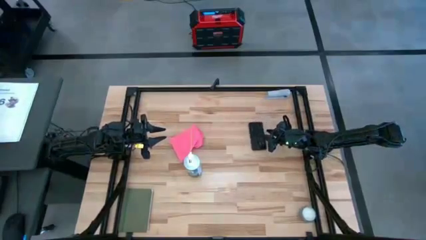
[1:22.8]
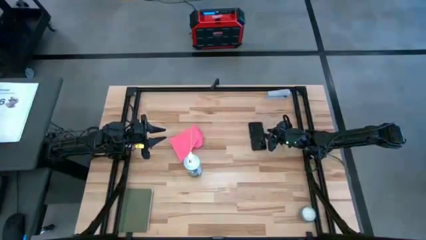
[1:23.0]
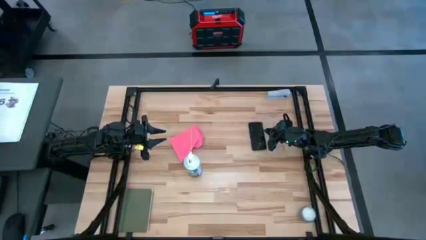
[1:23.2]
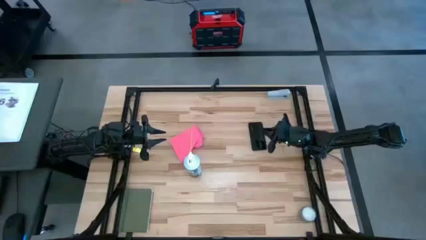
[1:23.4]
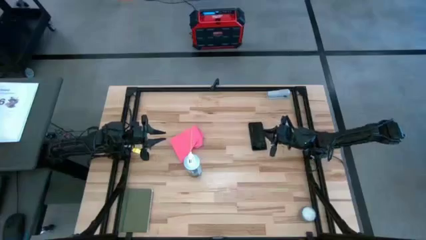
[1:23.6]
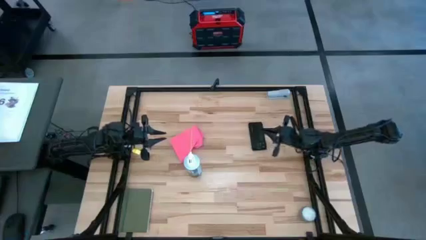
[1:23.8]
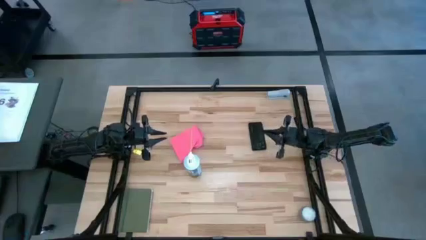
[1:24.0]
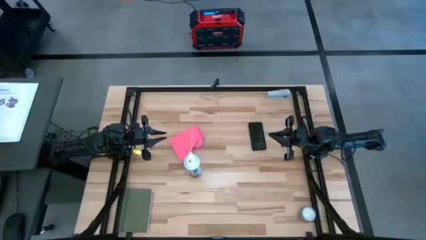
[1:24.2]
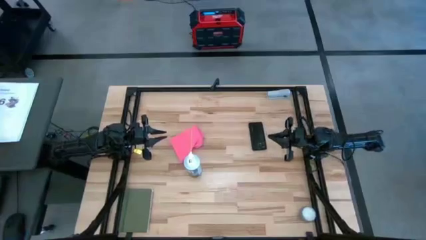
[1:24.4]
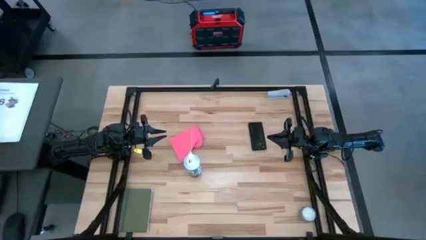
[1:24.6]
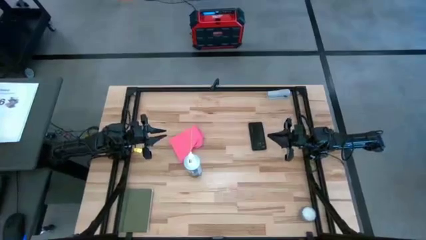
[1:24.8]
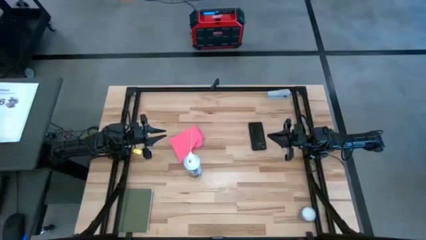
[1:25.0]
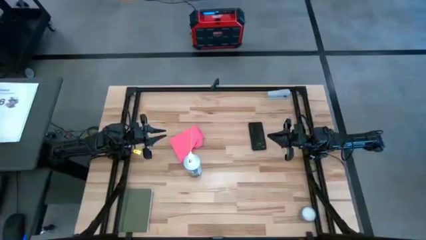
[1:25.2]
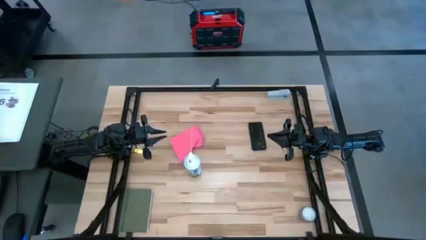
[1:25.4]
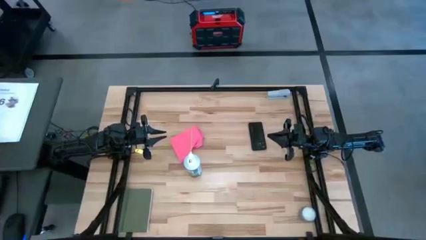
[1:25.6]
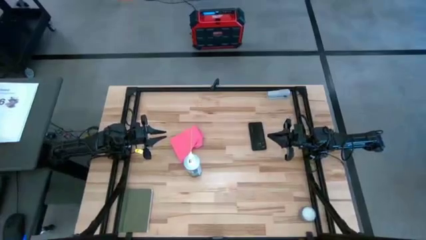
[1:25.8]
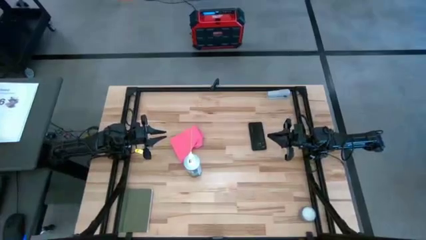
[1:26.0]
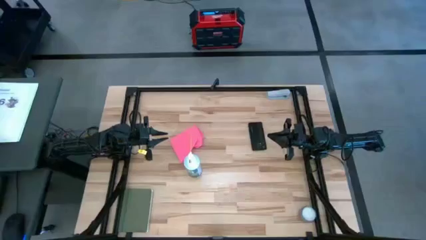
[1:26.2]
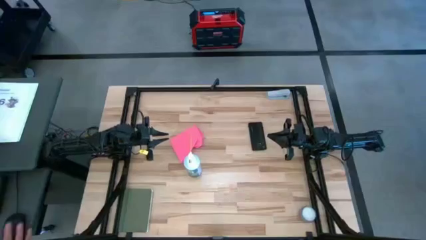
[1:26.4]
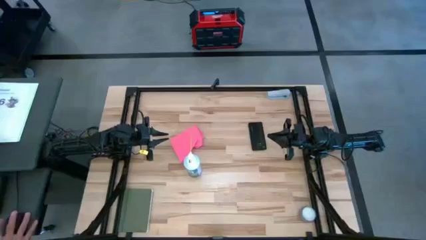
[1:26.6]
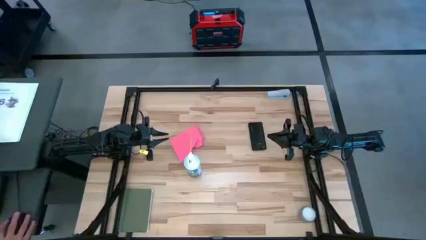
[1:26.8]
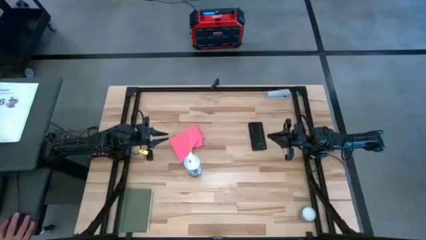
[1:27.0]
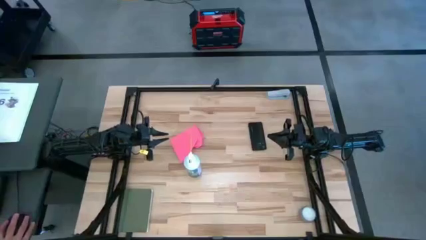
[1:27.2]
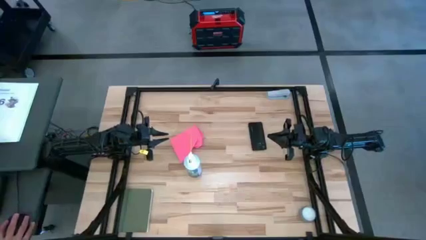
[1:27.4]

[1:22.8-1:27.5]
Task: Apply microfiber cloth
Return to Home Position

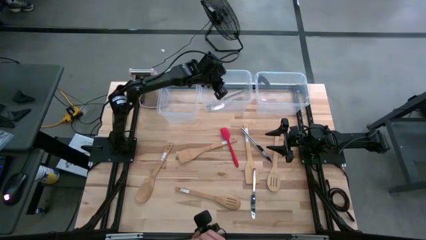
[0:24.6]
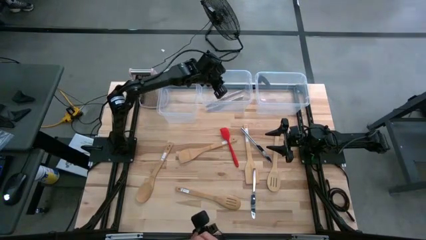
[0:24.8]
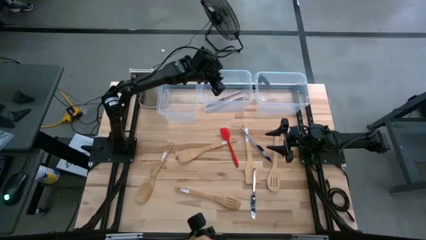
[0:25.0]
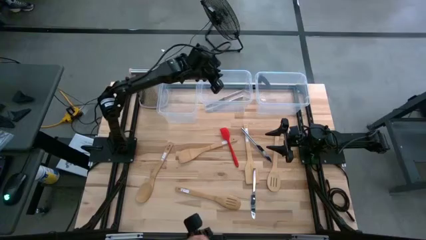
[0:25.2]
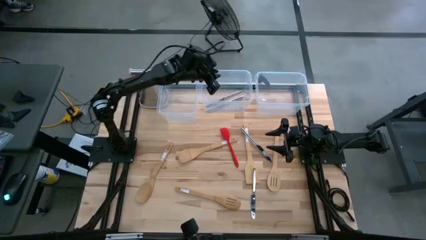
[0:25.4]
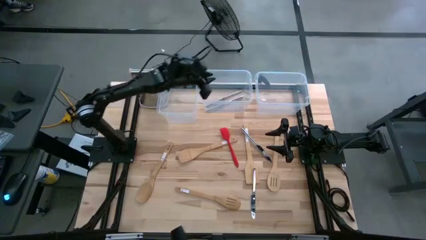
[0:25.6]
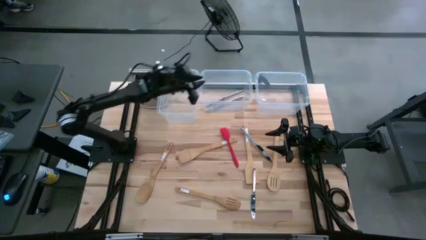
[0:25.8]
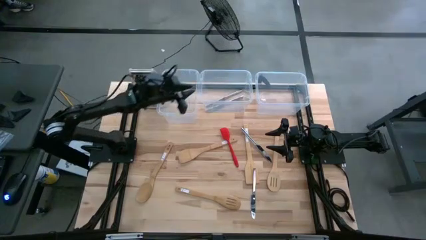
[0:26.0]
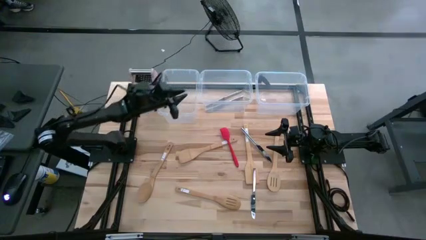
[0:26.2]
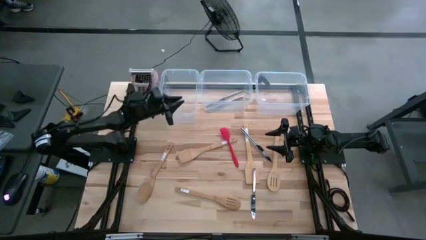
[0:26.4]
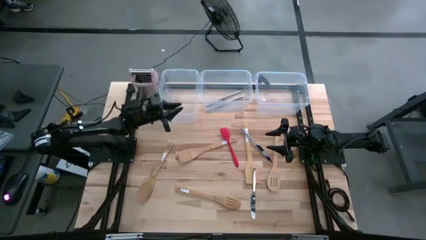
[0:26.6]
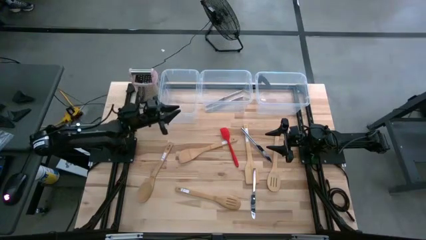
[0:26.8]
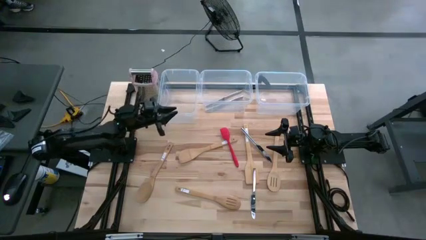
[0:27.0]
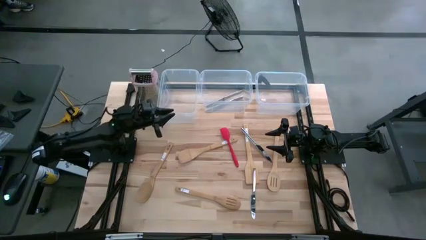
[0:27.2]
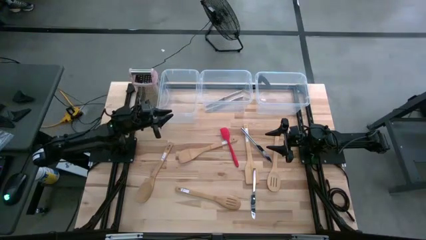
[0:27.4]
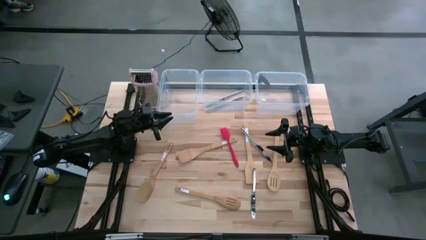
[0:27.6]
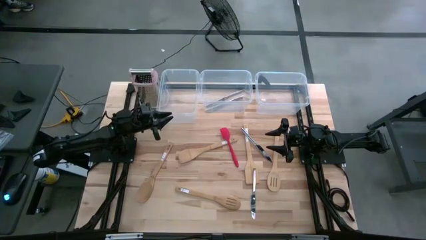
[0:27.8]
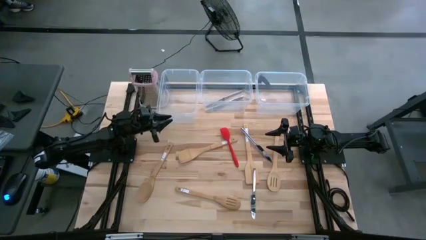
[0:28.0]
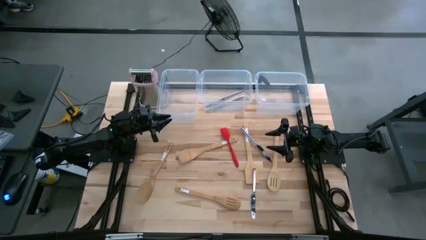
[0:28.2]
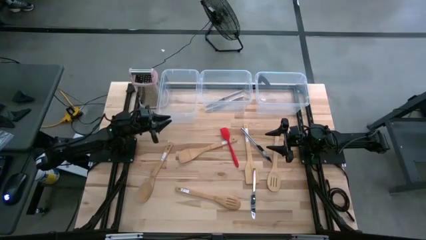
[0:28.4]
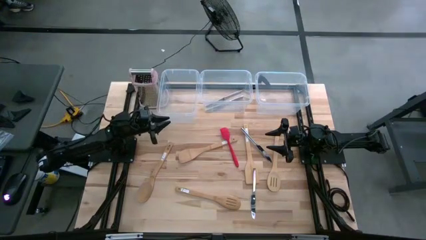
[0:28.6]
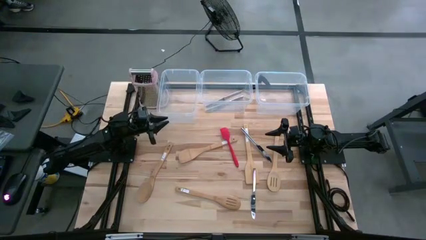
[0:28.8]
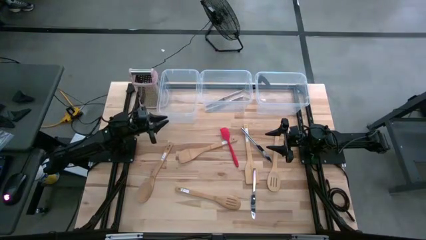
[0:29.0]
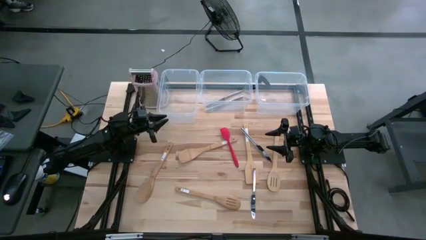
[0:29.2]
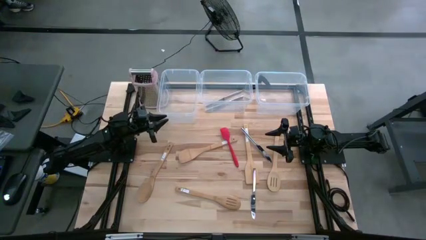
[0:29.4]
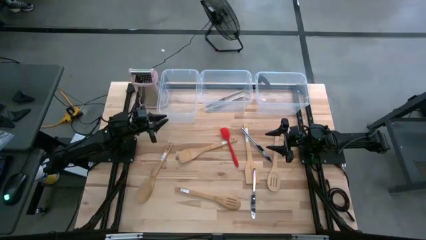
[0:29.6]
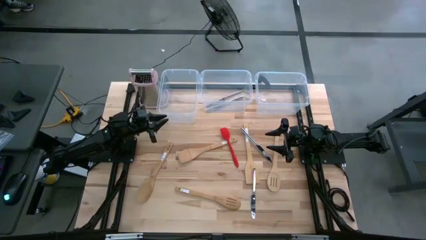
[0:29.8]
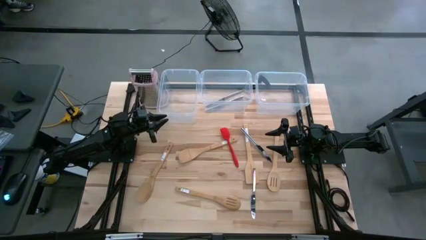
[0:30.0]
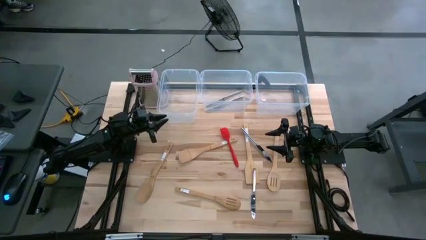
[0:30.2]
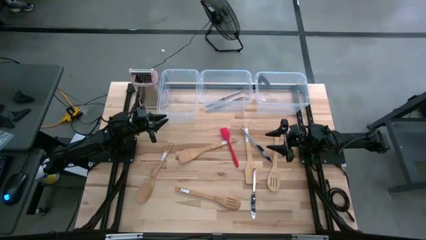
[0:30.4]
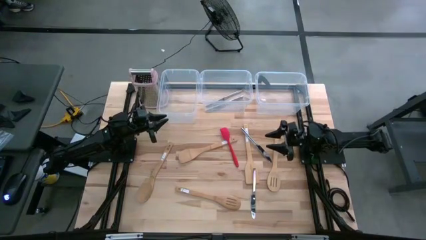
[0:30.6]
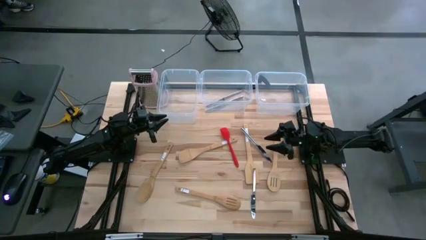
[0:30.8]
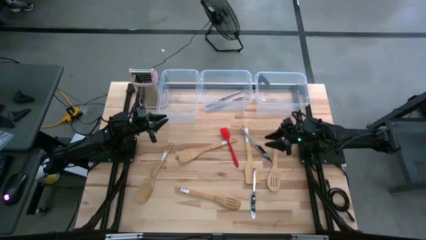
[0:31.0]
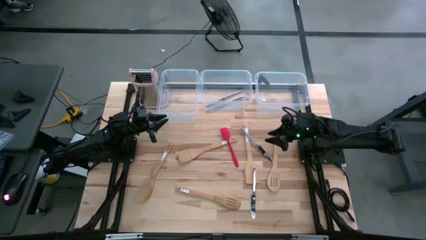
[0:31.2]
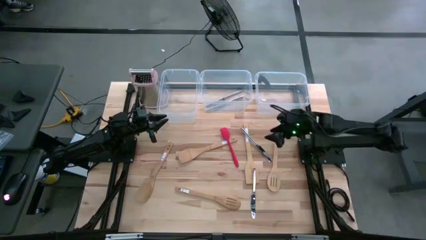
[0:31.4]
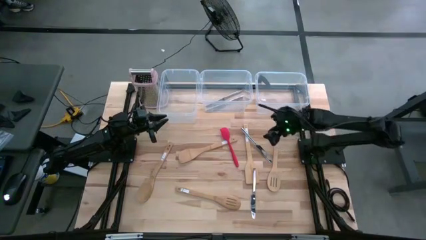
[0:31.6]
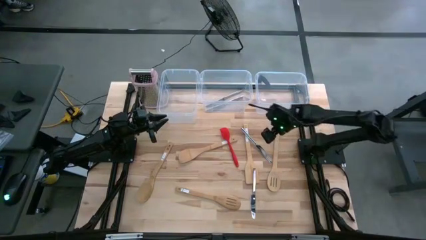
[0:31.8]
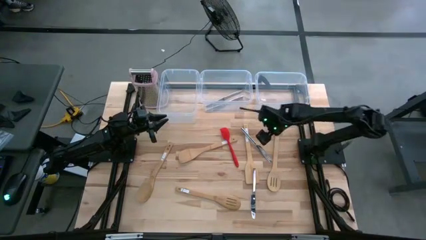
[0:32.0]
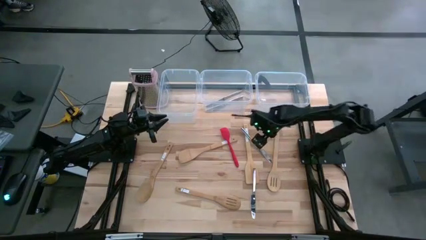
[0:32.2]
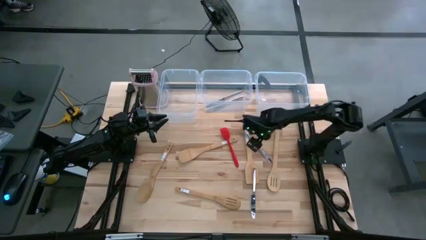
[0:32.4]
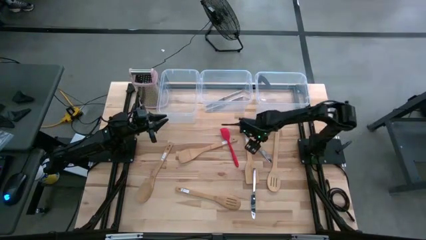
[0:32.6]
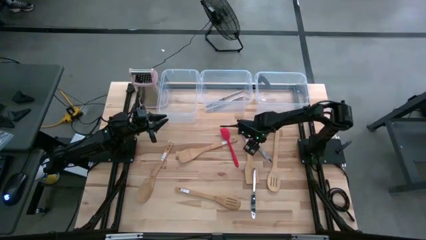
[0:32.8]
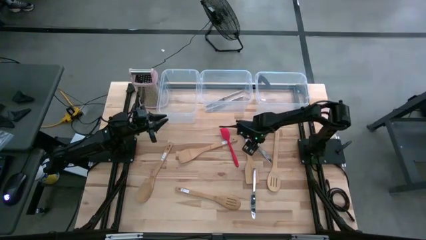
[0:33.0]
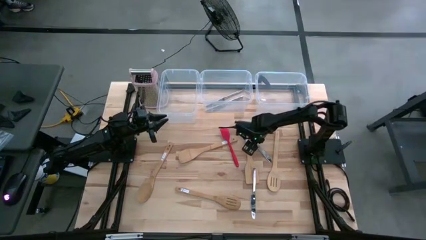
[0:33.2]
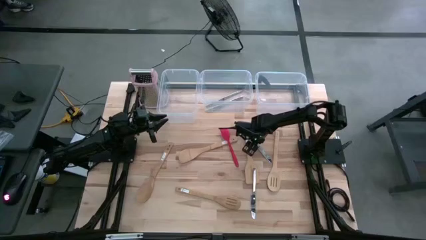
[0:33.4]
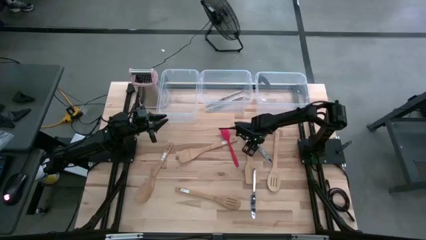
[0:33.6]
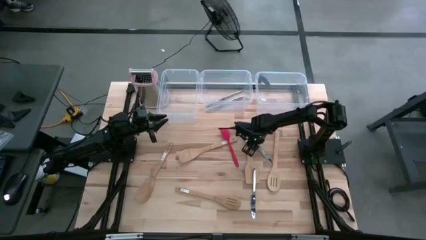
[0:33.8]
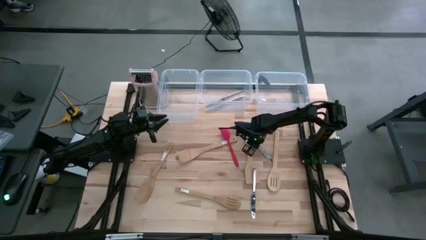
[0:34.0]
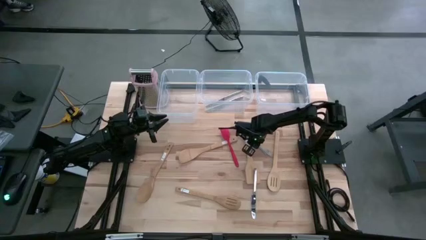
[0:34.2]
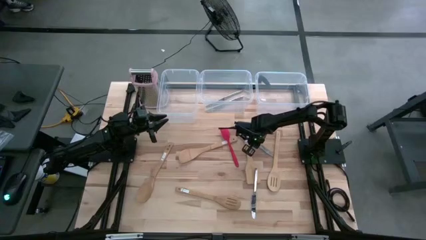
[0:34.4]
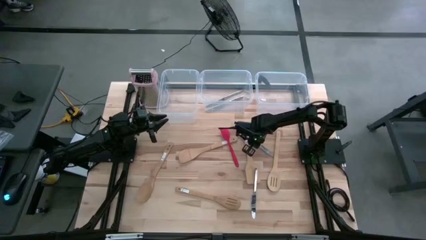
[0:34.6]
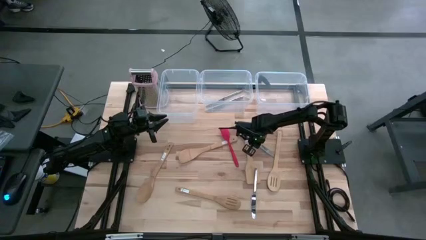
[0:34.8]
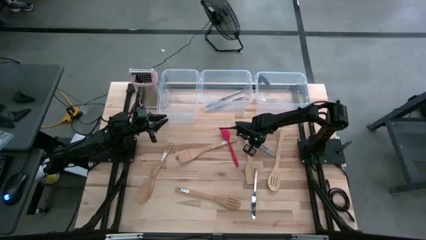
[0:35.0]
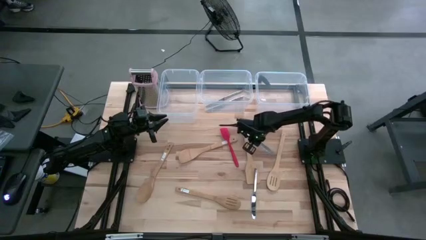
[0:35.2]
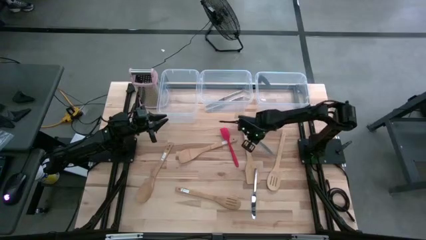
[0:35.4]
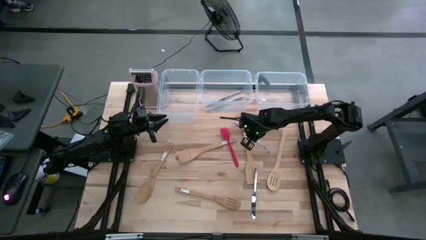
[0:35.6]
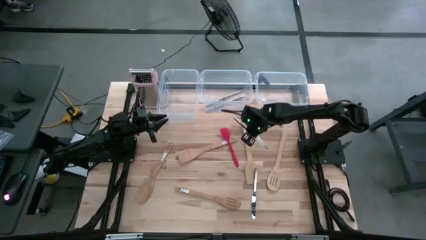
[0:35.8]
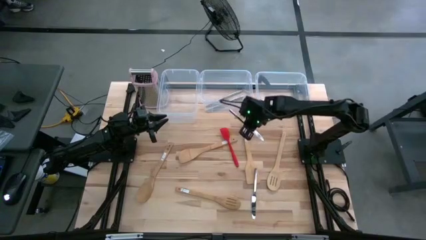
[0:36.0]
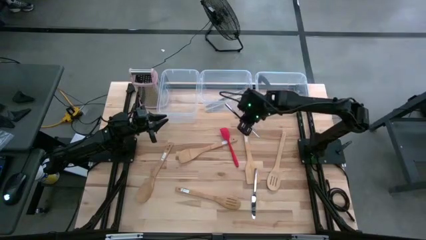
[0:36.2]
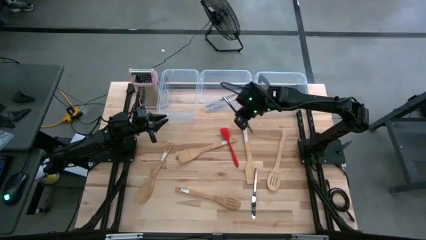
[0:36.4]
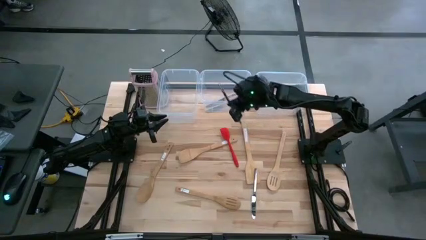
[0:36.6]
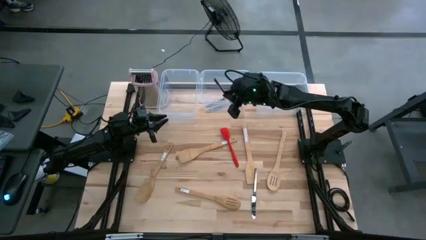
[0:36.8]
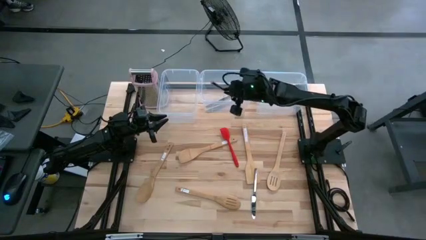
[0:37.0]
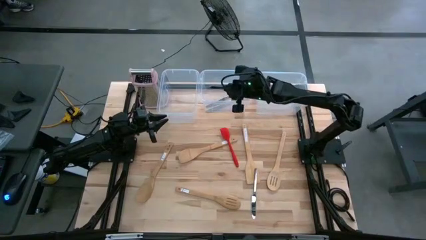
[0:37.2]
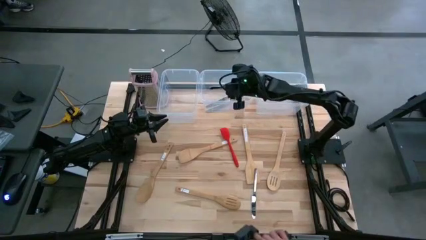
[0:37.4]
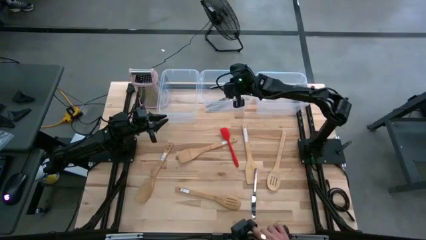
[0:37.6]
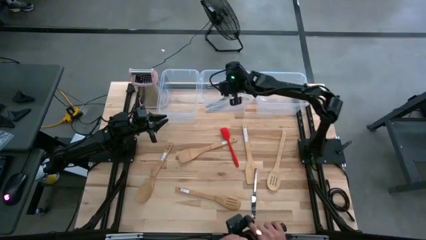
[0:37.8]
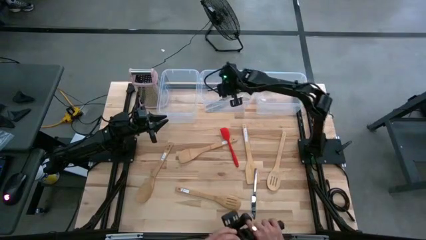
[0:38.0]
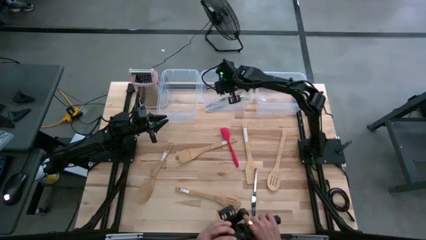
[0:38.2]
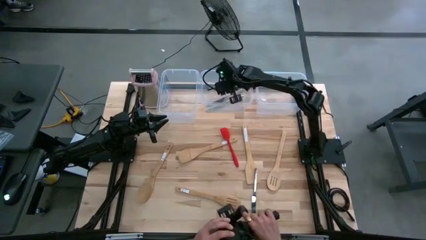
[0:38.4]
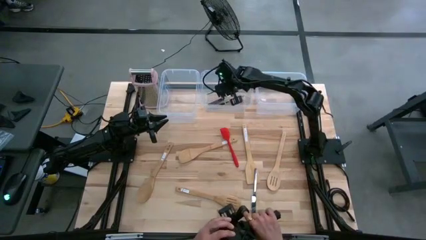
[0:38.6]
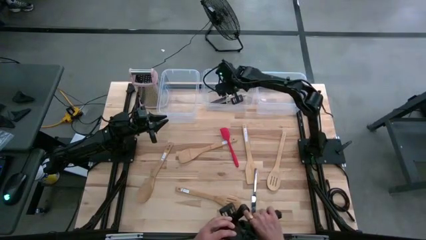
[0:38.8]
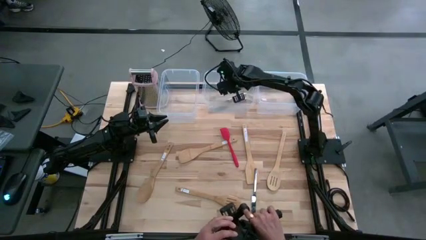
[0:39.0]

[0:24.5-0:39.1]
Task: Pick & Place Kitchen Items
Put the silver table knife into the middle transparent container
